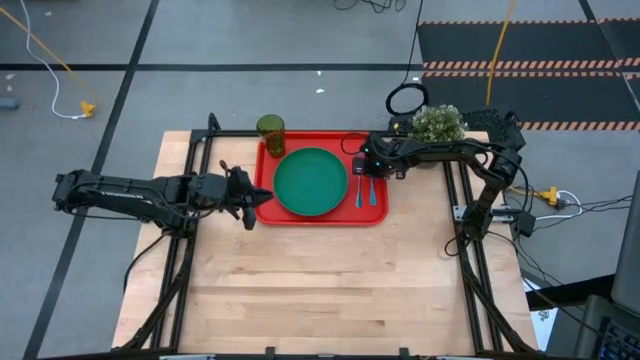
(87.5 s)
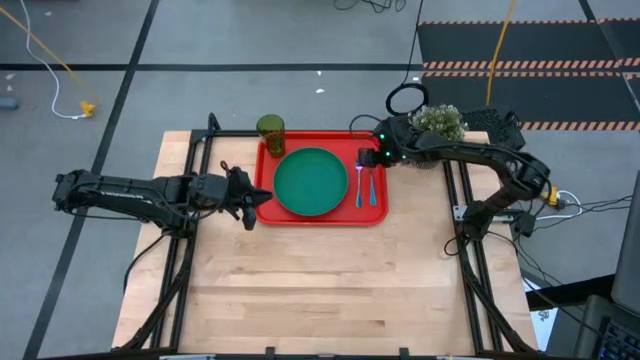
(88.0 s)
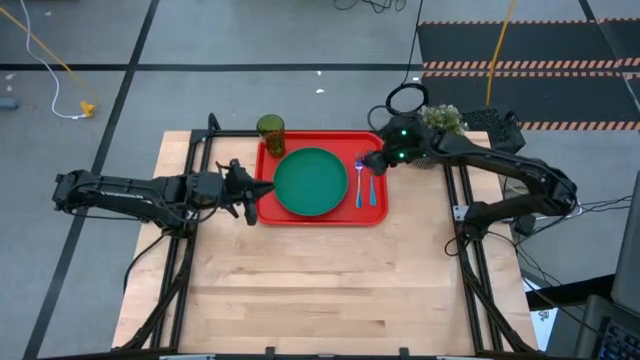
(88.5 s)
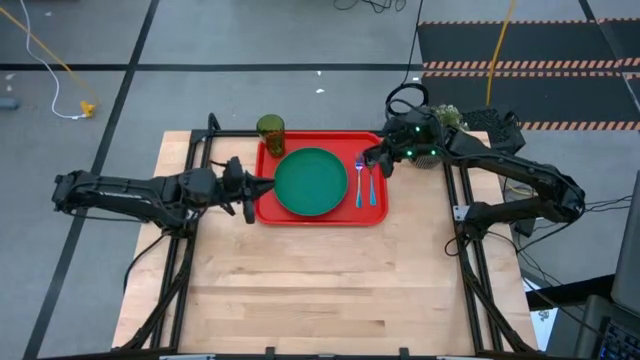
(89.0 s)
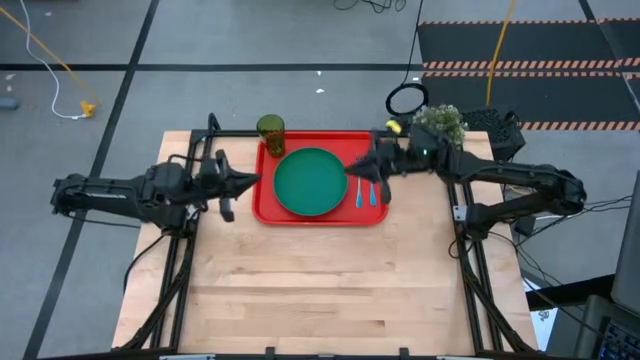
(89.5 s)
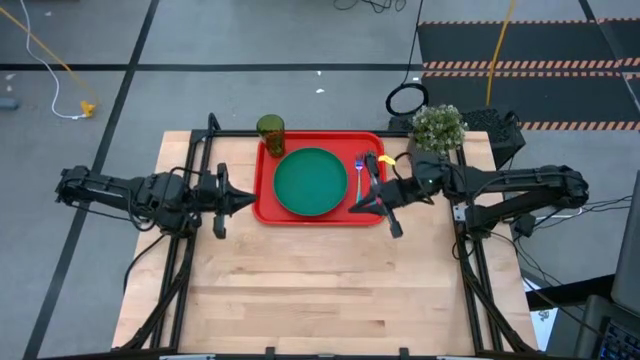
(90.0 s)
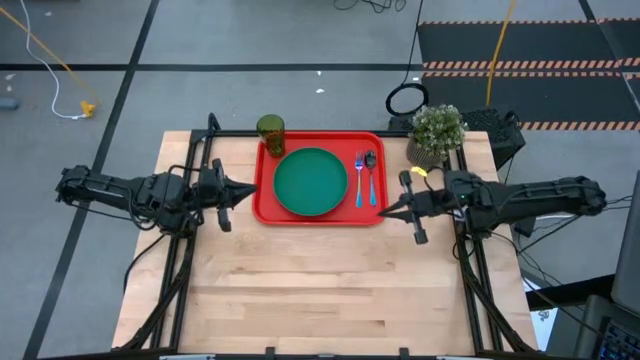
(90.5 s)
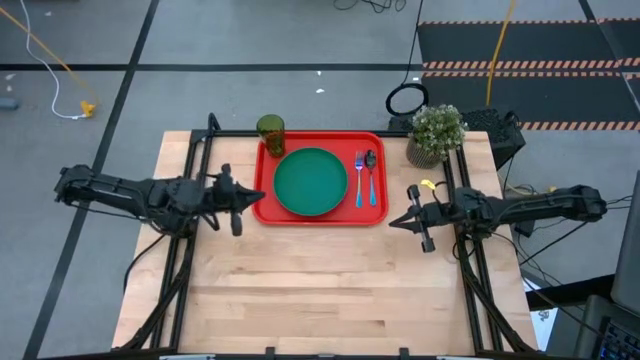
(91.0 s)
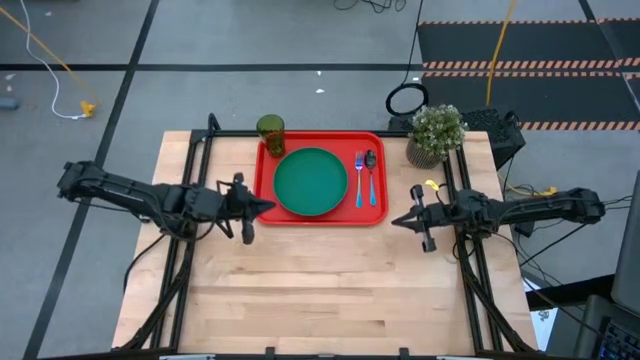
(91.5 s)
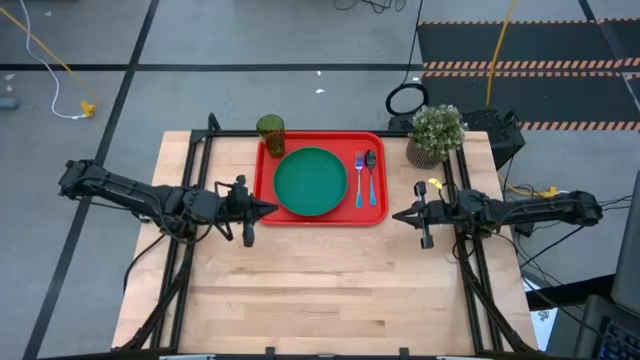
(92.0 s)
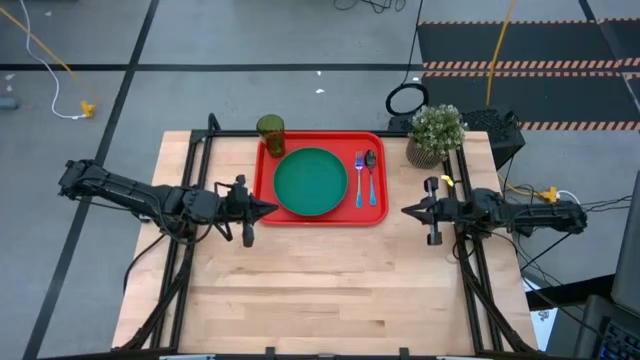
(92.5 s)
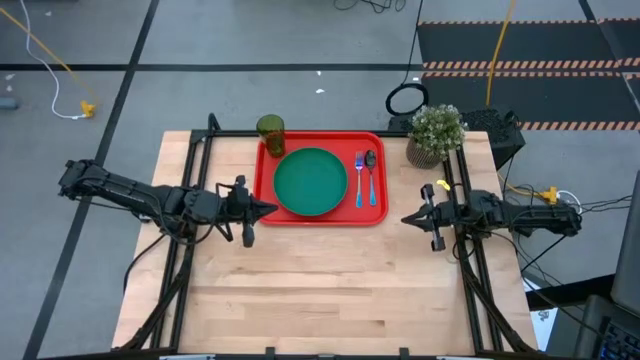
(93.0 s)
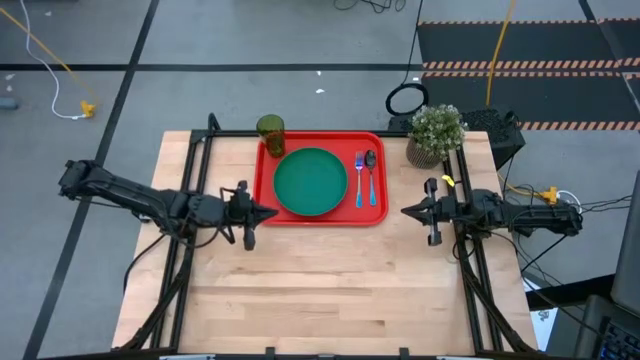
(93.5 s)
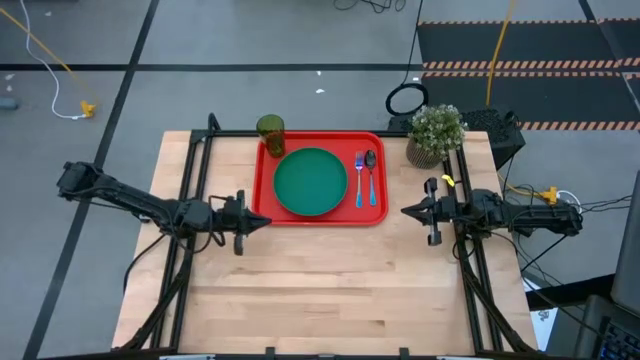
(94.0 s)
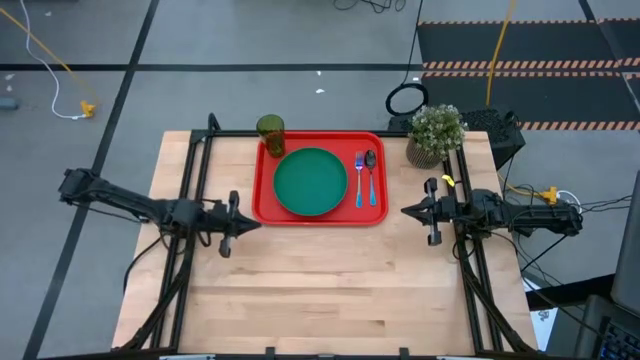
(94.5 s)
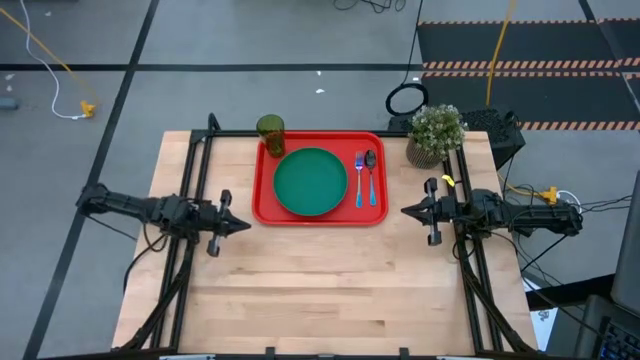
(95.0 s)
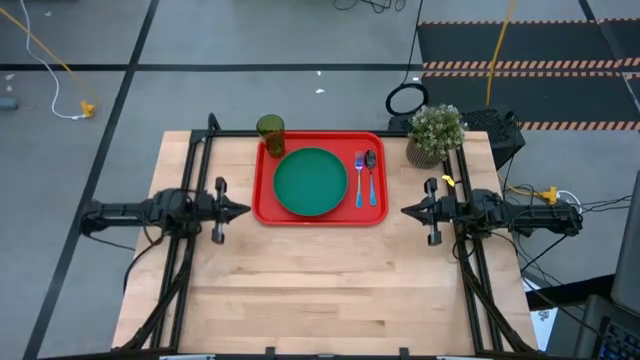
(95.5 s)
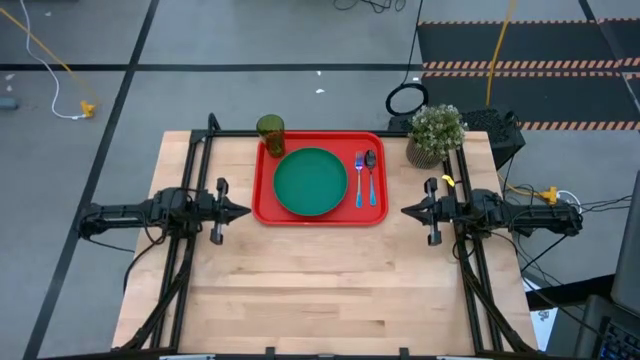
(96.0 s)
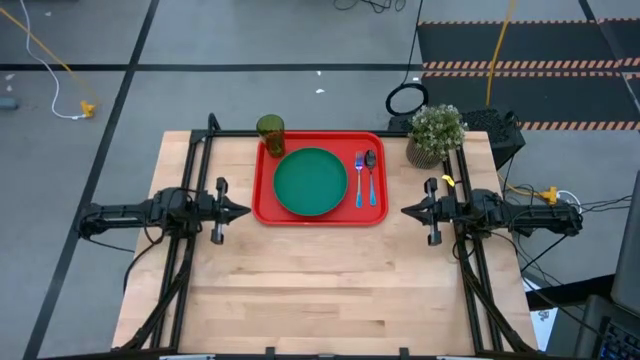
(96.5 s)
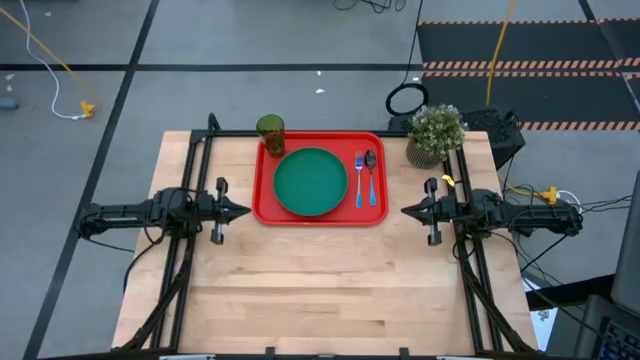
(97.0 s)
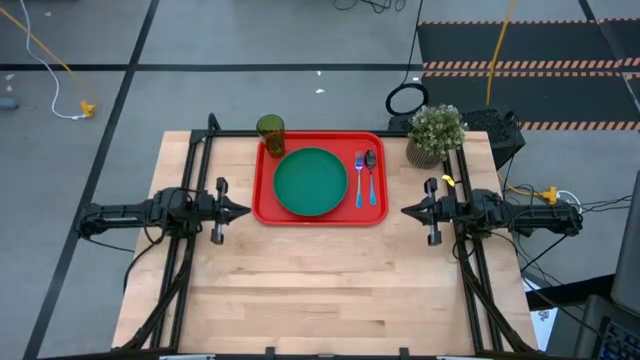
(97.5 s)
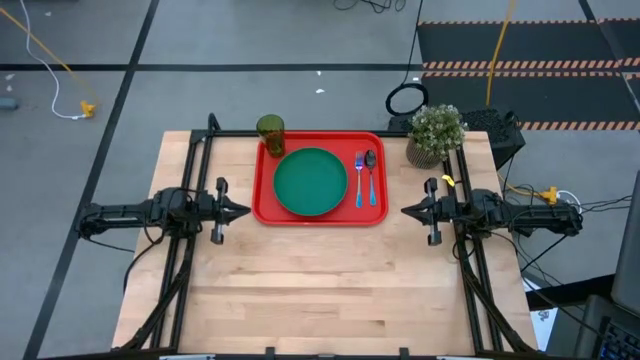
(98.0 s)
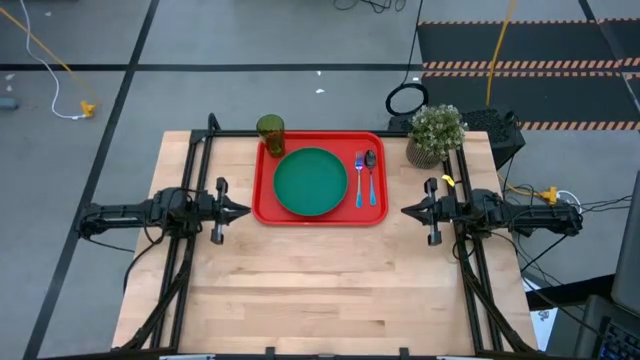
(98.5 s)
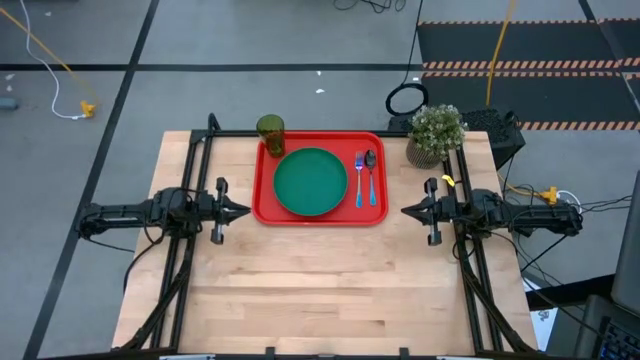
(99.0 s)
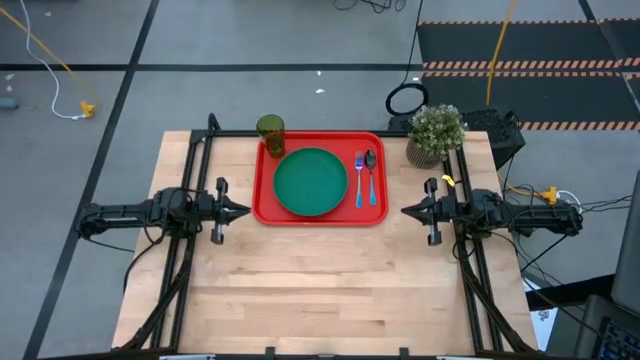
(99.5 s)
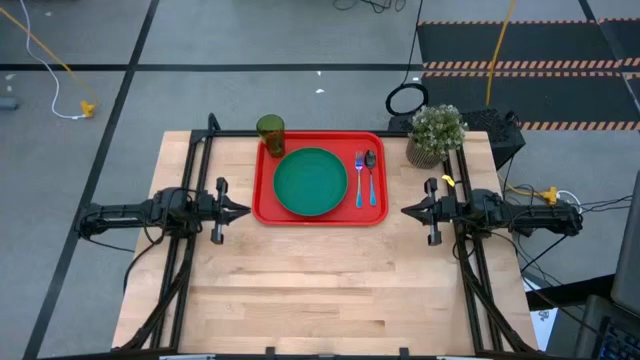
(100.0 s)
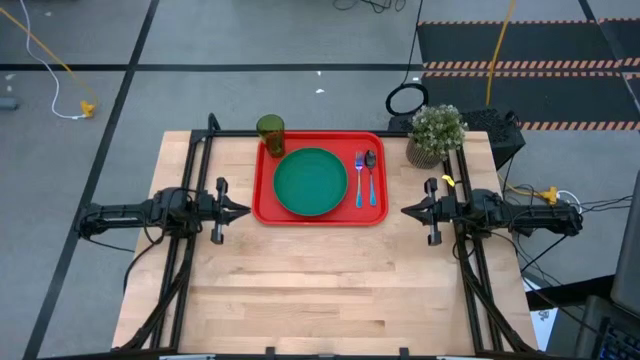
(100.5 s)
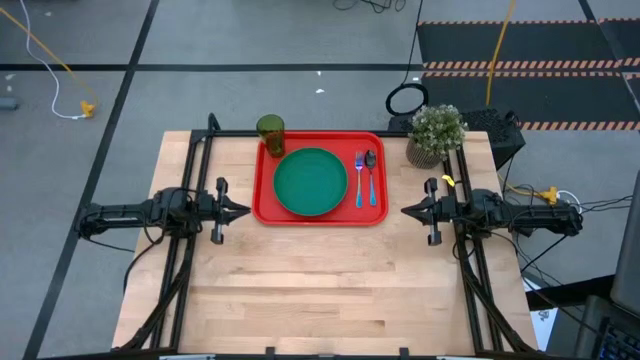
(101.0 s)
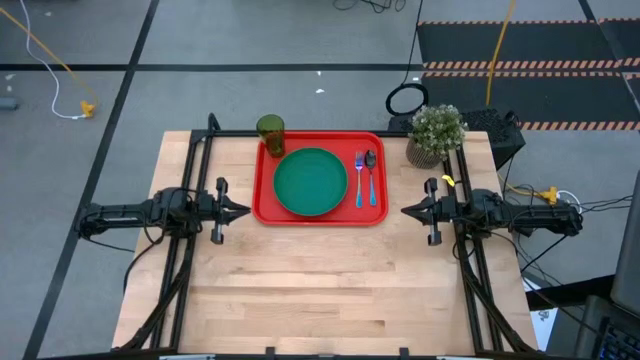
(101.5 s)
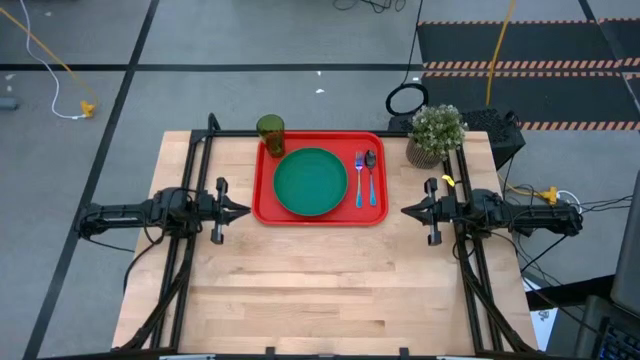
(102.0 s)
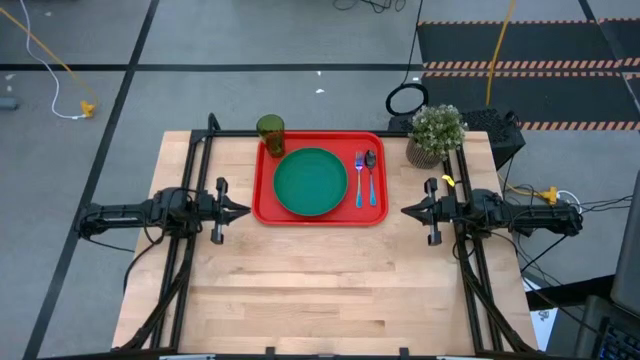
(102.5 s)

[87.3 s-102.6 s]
Task: Pick and place plate/cup/fork/spoon on tray
Return to Home Position

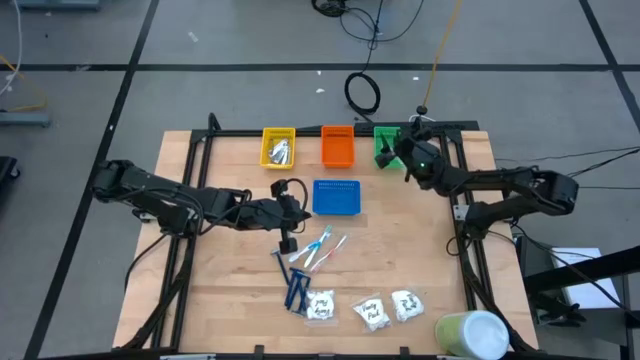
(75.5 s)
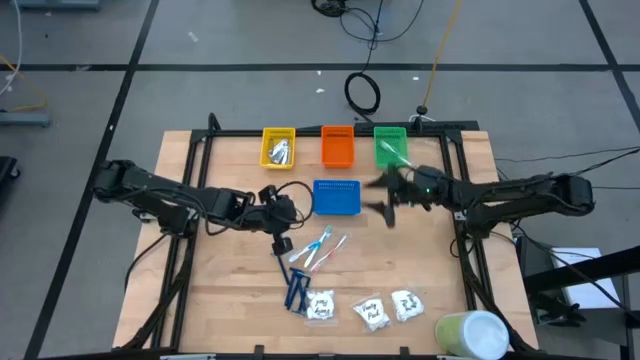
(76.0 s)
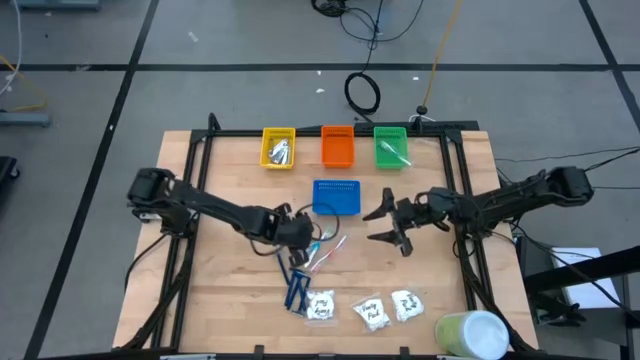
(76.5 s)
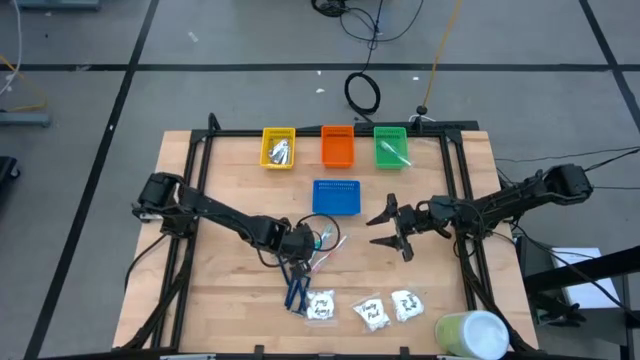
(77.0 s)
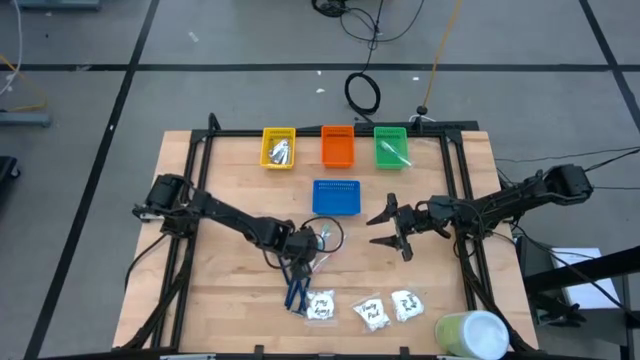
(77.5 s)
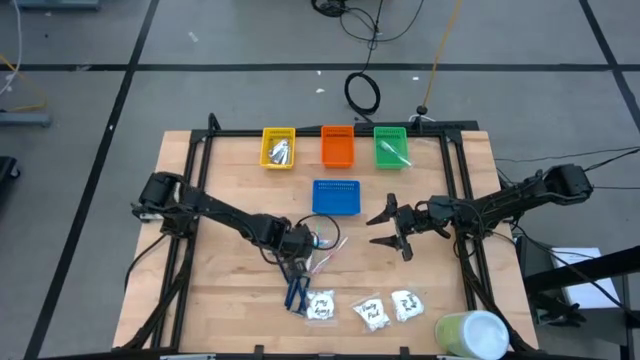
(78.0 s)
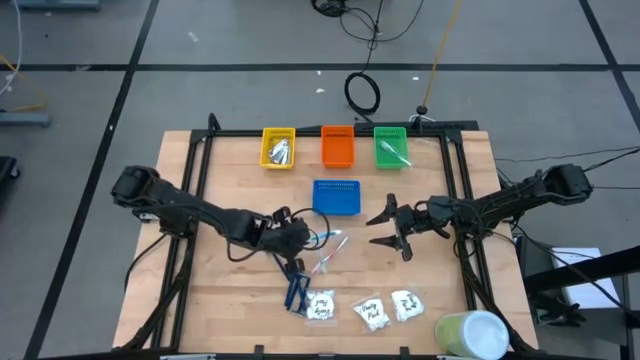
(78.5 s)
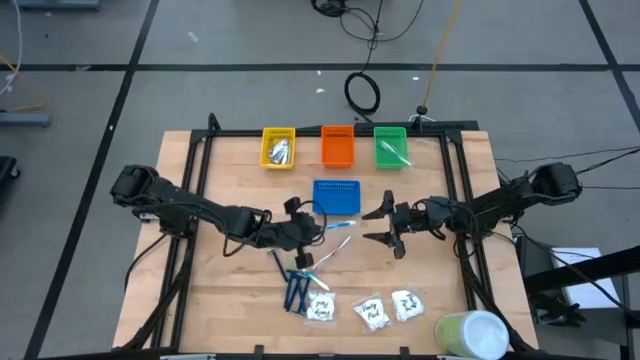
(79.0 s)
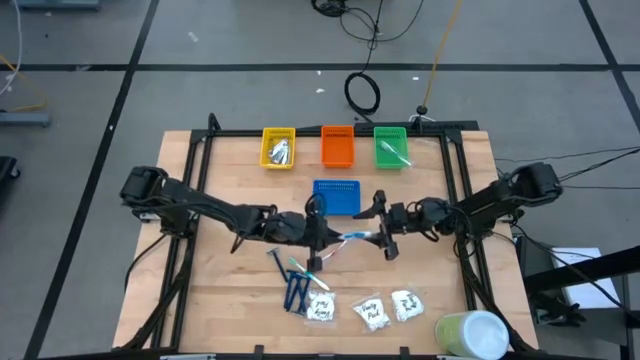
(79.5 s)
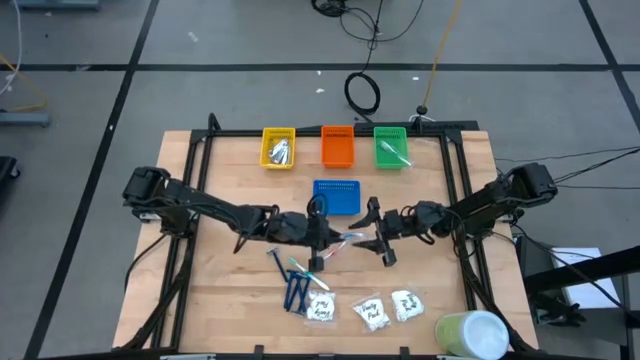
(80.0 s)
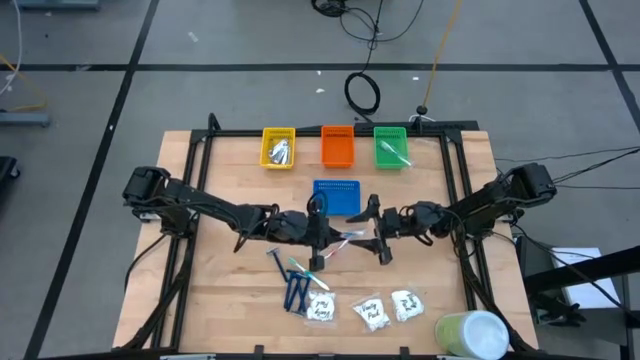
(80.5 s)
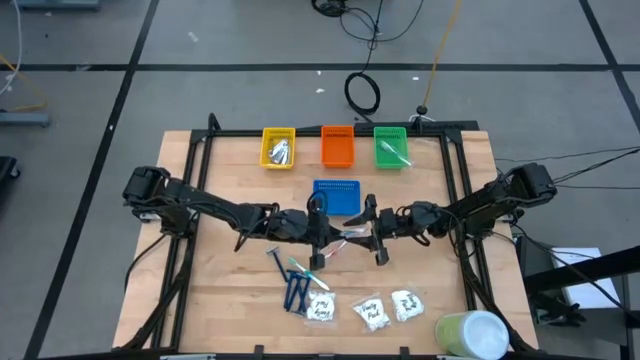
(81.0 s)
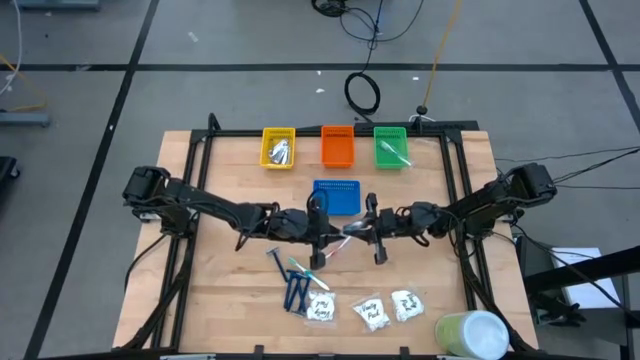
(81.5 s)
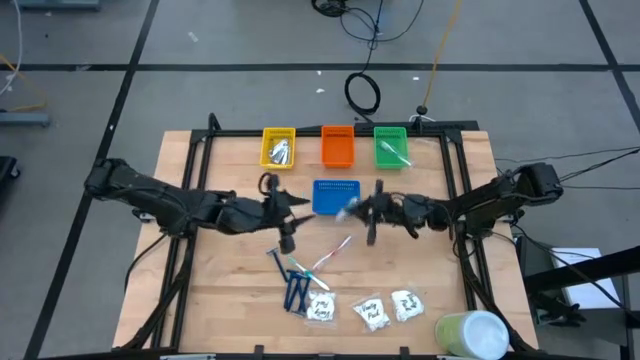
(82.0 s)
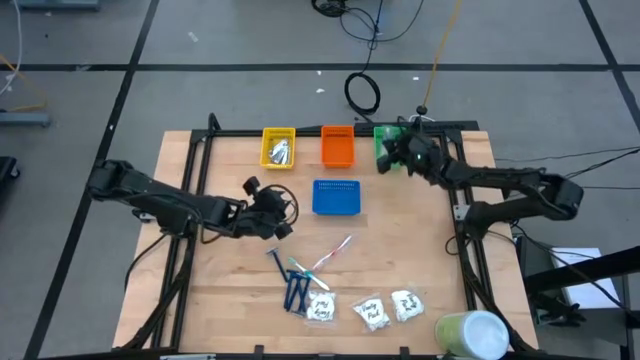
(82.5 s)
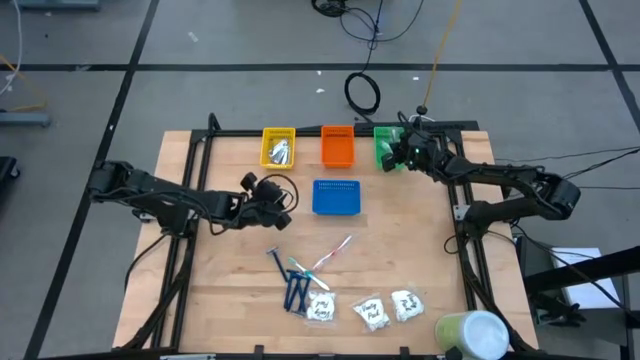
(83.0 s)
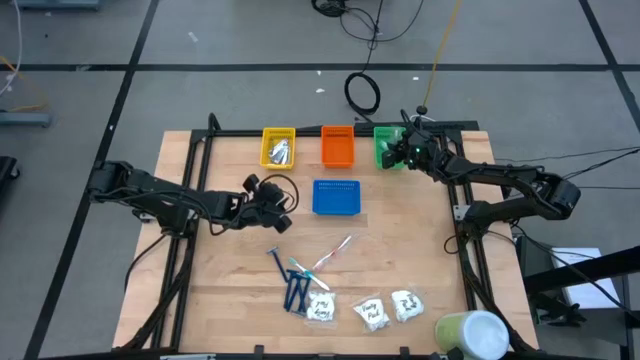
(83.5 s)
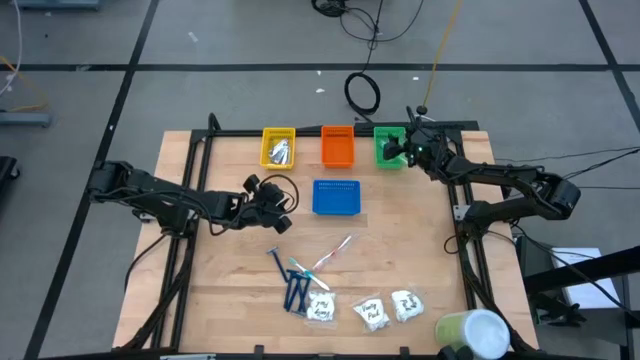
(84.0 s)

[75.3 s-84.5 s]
Task: Pick & Place Travel size toiletries
Put the blue toothbrush into the green basket
